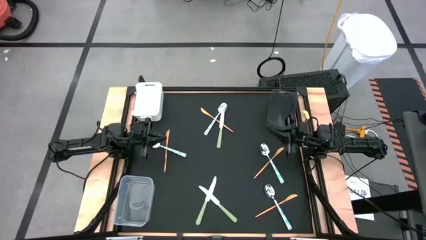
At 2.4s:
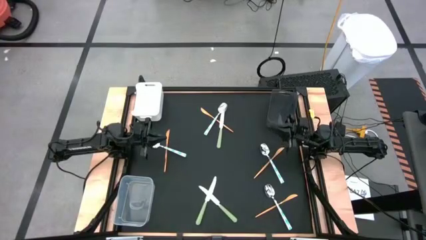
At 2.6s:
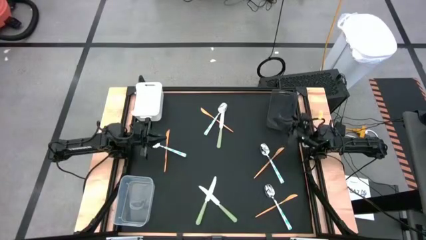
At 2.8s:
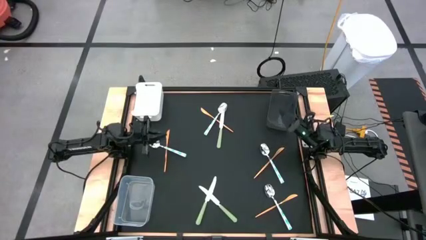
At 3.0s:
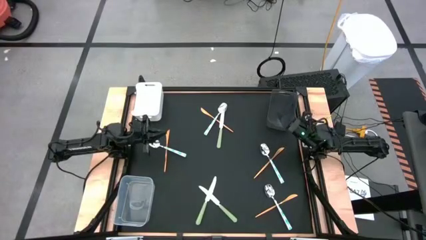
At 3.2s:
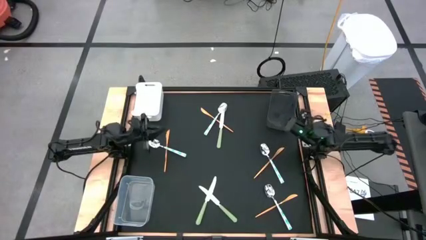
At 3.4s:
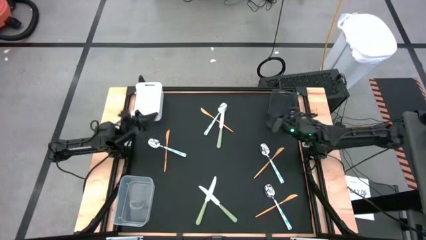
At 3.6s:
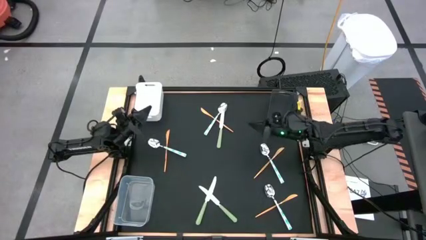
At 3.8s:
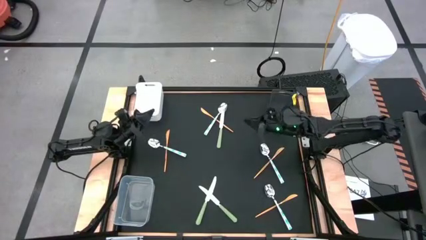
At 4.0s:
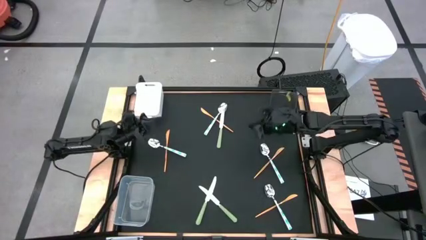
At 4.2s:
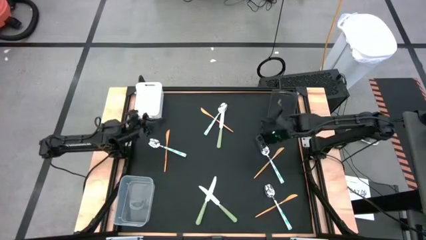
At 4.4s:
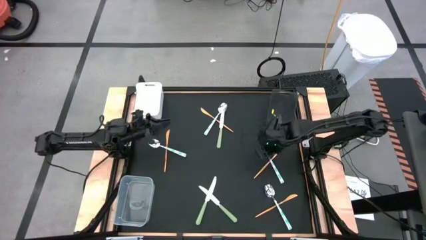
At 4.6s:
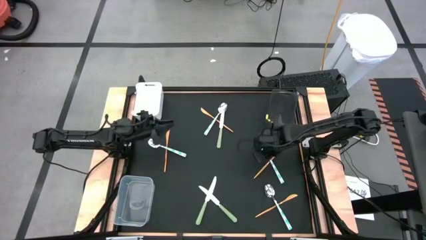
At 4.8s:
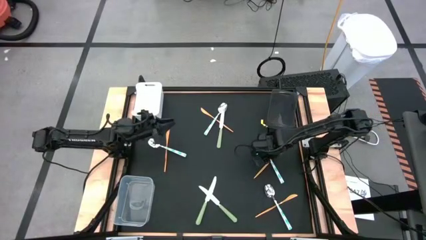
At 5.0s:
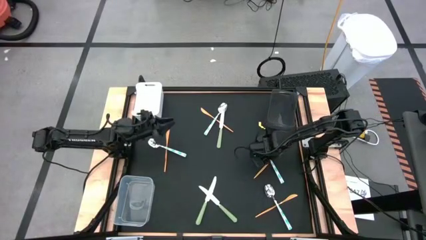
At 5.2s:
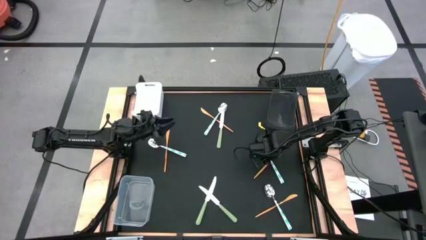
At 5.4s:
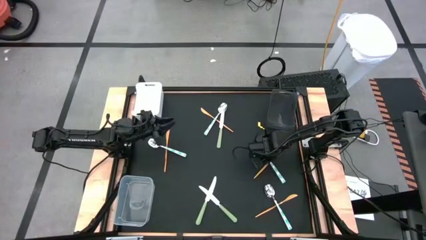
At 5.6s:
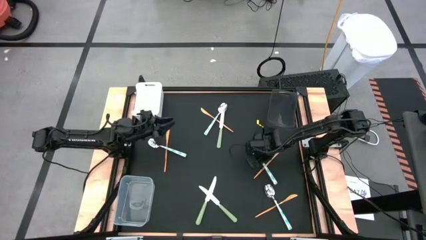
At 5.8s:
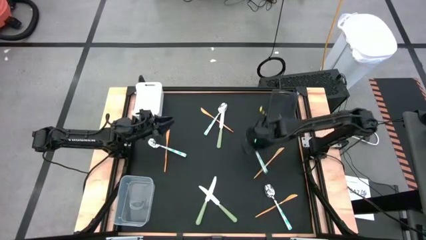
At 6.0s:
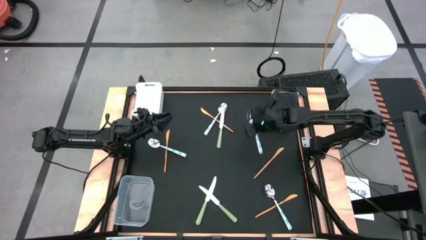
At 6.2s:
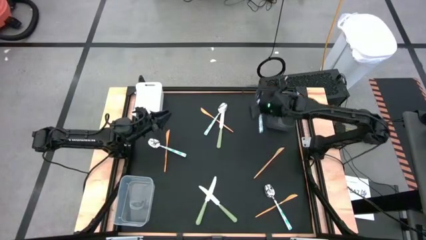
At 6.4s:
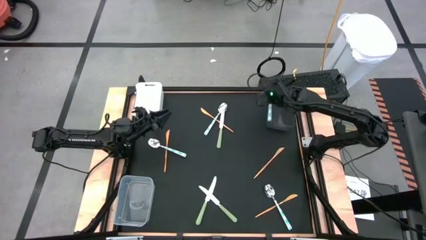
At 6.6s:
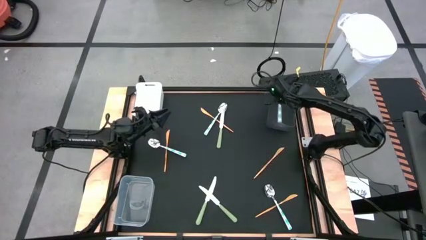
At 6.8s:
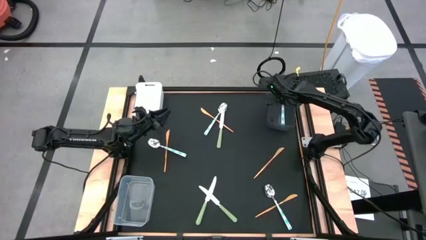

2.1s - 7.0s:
Task: Sort silverware by color (type)
Put the blue spoon into the black bin

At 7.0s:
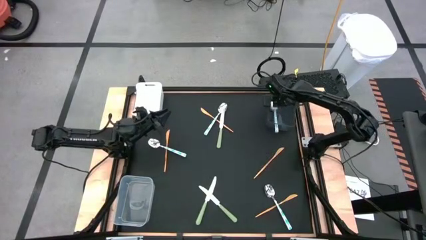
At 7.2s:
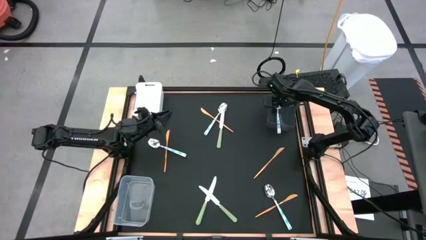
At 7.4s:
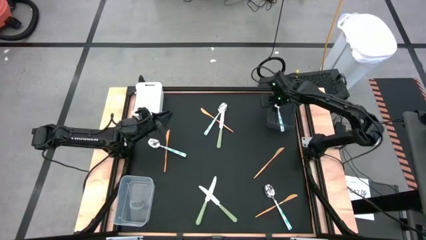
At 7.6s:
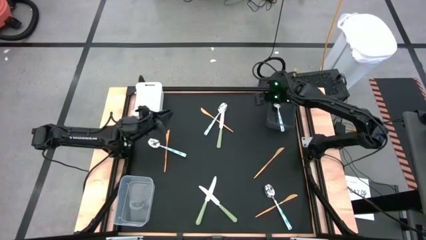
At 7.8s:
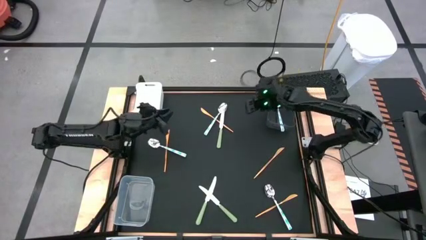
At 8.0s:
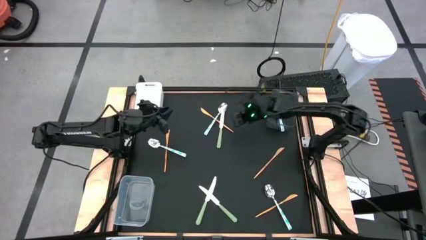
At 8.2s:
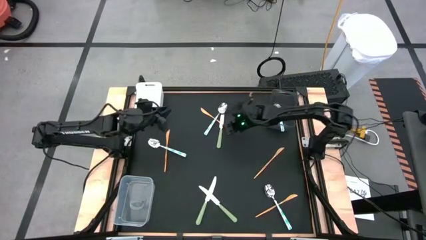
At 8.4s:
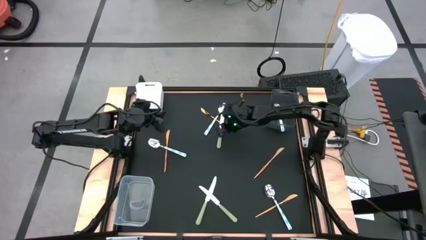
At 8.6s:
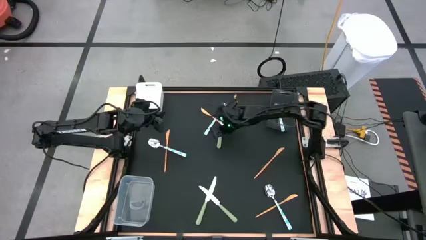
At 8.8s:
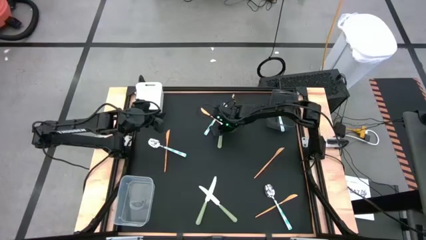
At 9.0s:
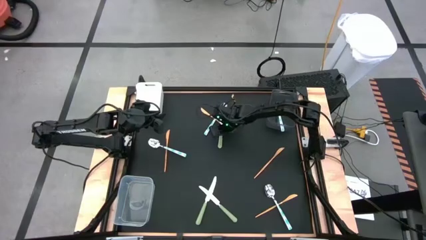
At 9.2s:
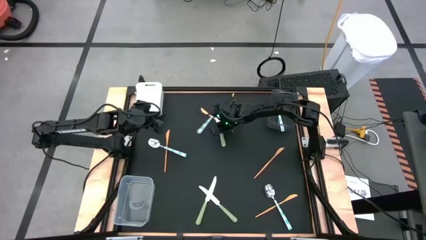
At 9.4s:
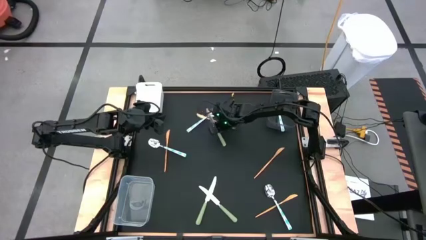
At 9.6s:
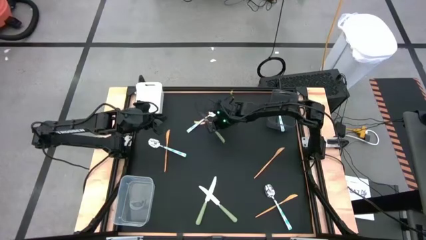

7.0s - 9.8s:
Put the green knife into the white bin

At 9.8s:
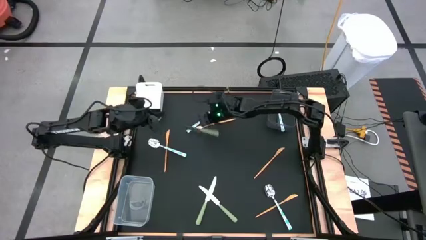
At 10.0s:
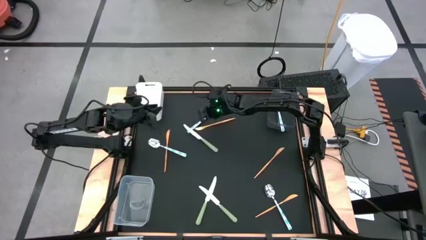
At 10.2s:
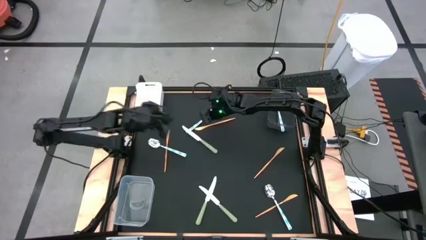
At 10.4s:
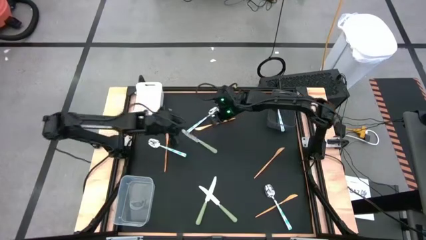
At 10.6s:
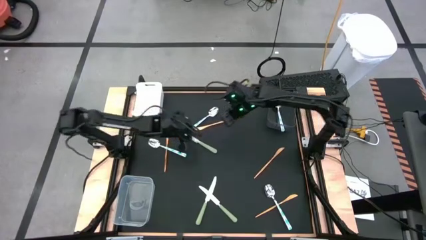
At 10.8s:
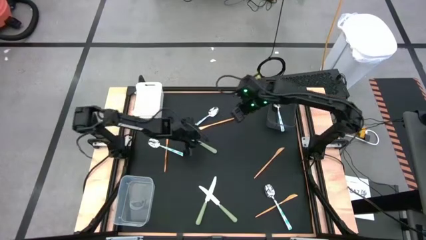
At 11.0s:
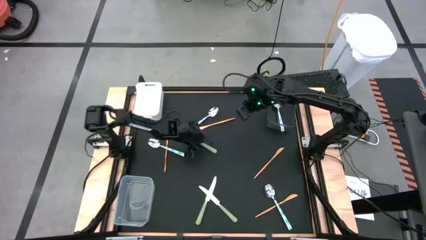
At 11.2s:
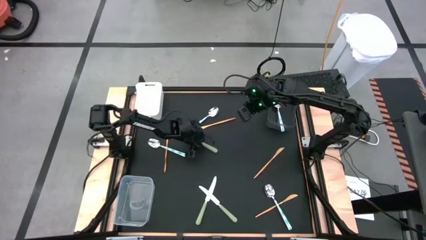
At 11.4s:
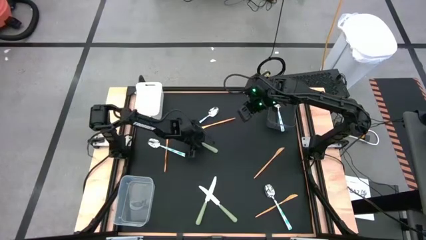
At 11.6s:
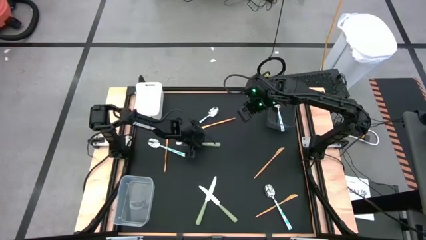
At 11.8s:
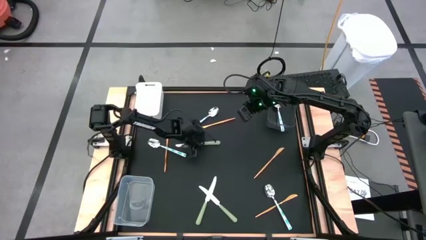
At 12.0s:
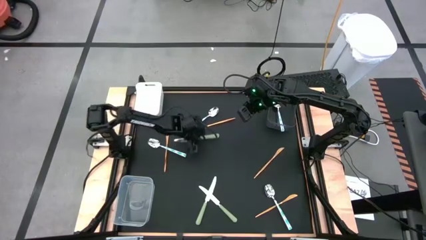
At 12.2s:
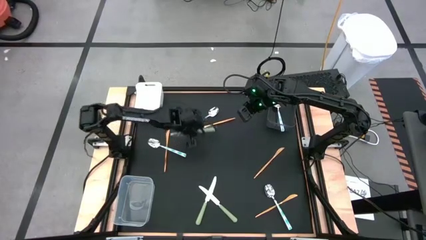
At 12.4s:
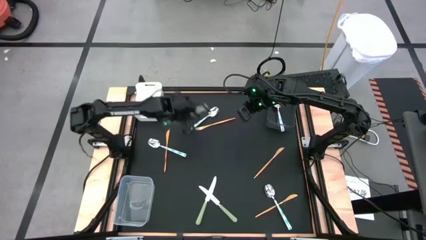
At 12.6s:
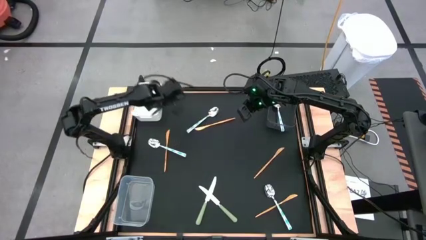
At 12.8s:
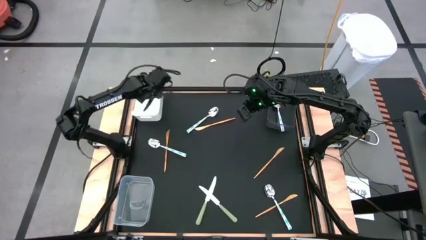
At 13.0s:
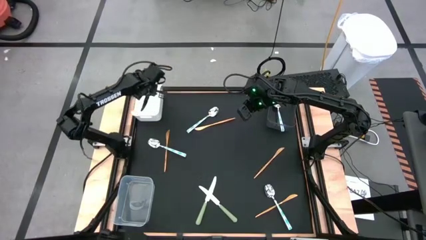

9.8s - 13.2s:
Put the green knife into the white bin

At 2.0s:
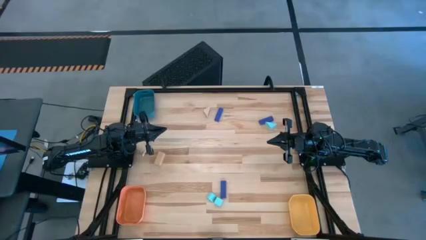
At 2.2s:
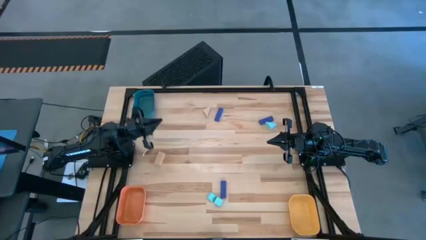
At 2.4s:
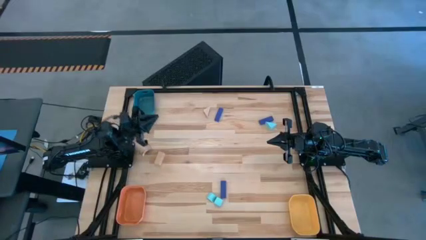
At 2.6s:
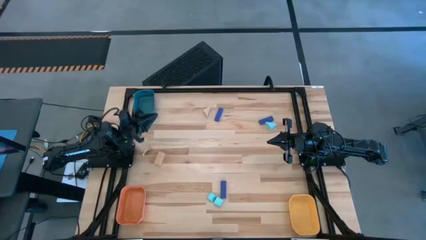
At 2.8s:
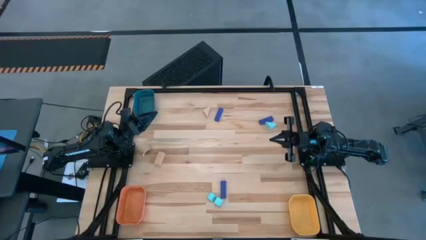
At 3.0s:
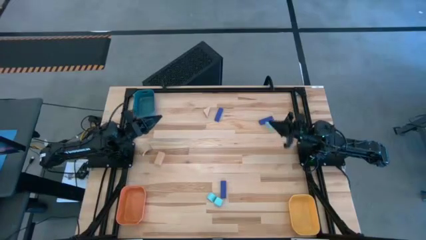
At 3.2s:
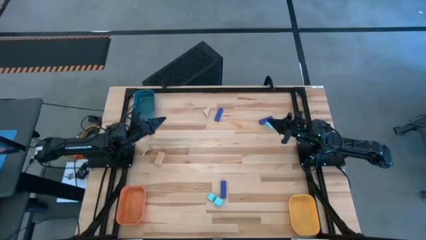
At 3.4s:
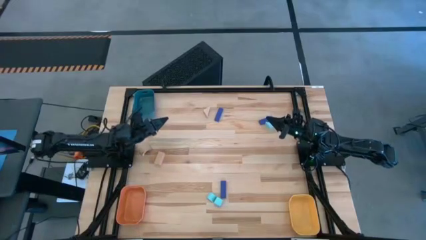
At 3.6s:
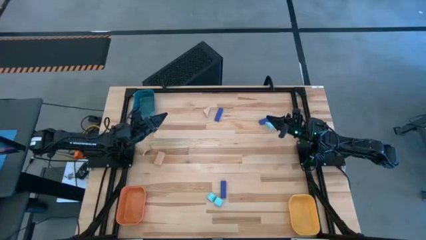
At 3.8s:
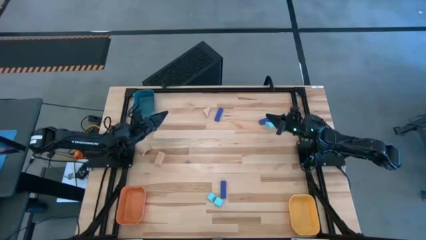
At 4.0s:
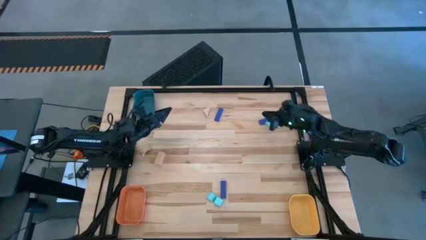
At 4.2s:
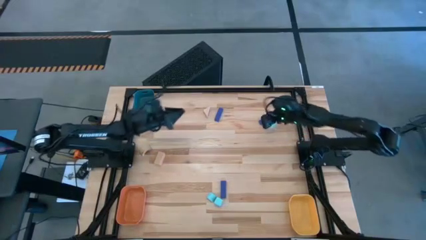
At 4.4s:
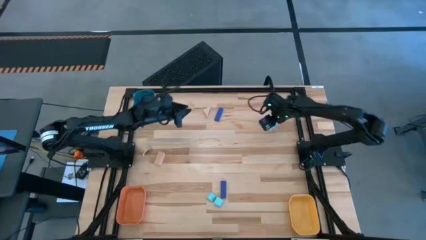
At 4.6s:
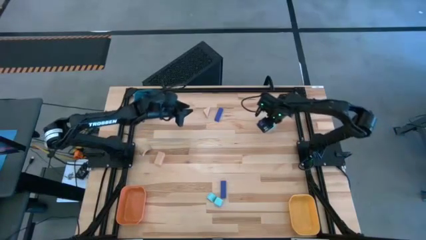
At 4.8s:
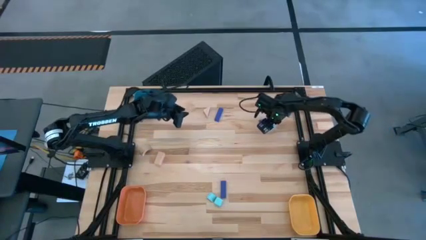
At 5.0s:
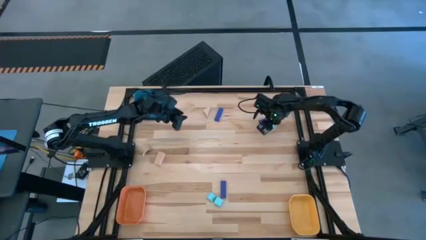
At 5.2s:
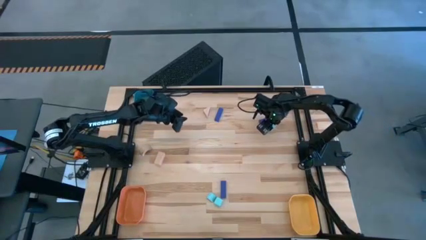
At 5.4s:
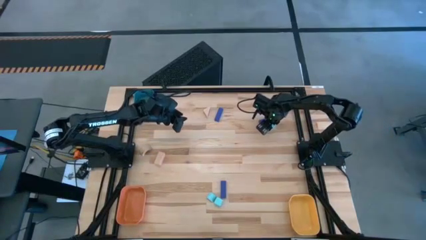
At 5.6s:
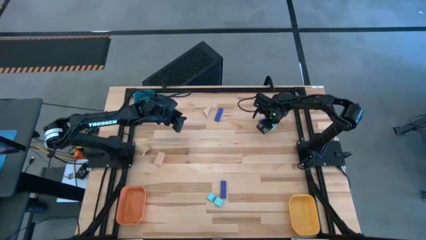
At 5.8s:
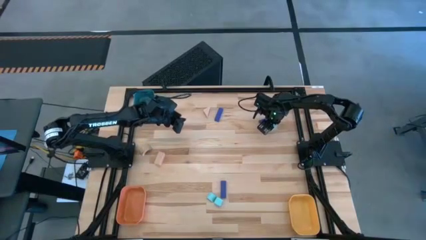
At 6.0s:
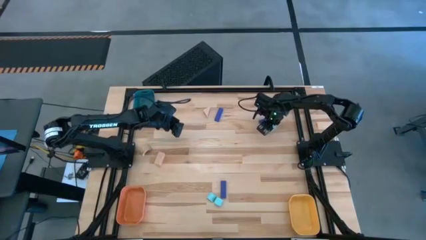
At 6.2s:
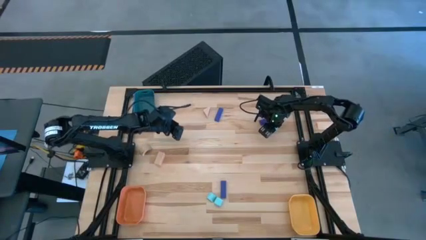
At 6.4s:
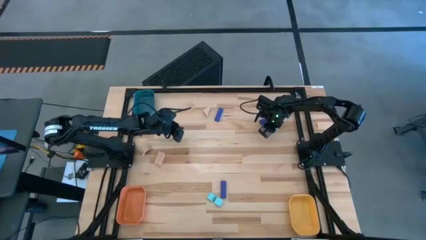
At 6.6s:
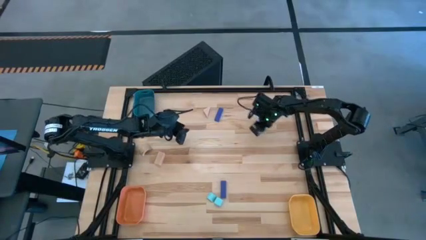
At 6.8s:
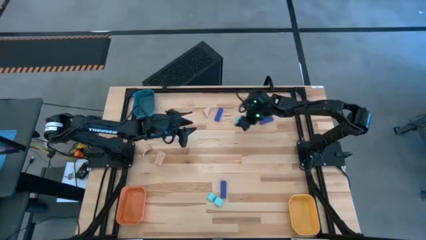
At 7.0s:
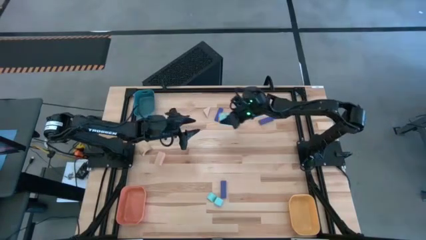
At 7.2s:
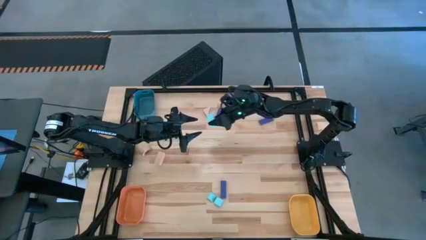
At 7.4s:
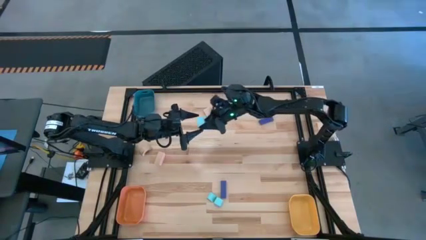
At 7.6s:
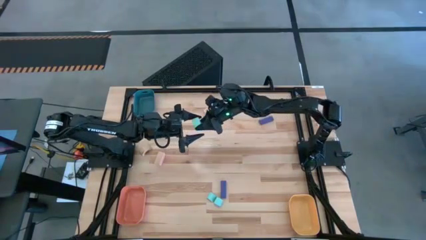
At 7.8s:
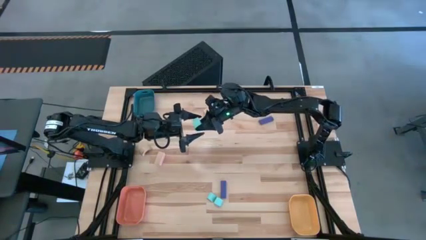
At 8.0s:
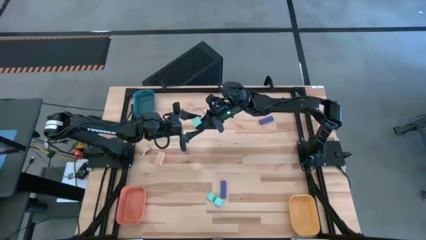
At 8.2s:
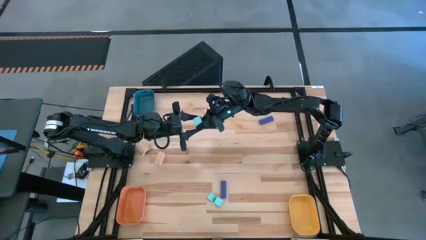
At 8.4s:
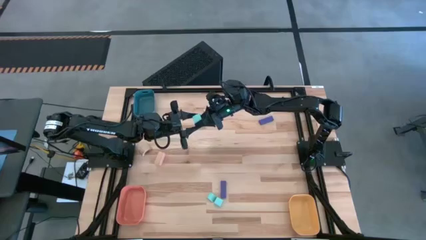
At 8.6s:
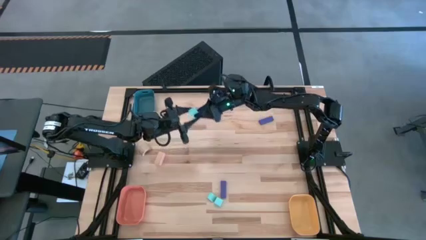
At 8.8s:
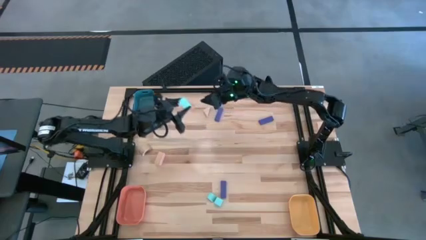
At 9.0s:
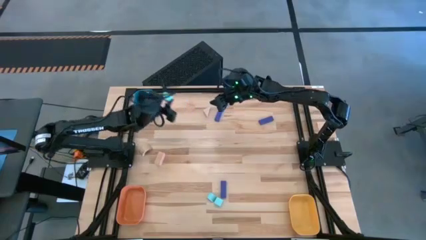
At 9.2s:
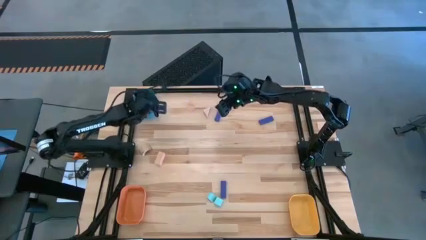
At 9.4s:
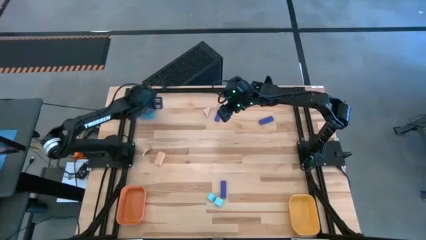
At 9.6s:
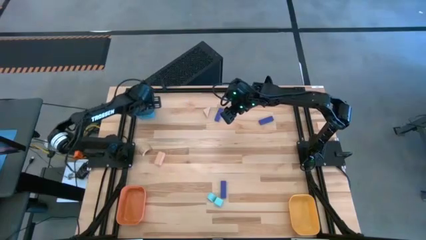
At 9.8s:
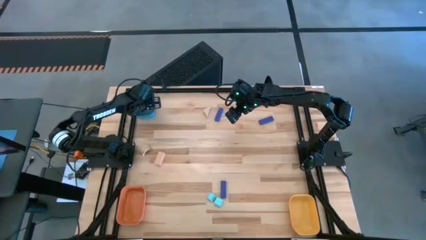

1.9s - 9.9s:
Task: Sort & place blocks by color
Put the top light blue block into the blue bin
